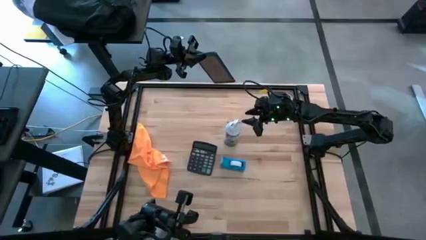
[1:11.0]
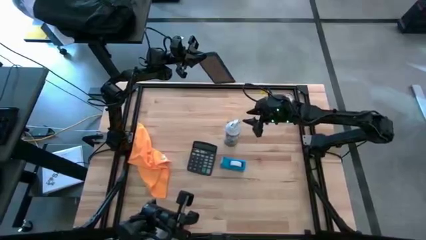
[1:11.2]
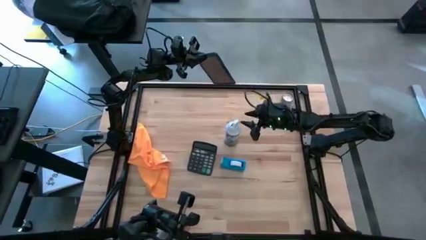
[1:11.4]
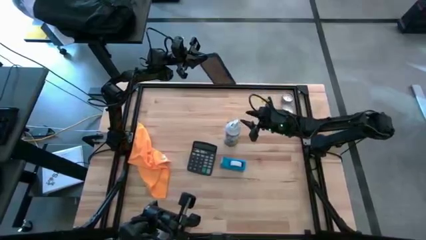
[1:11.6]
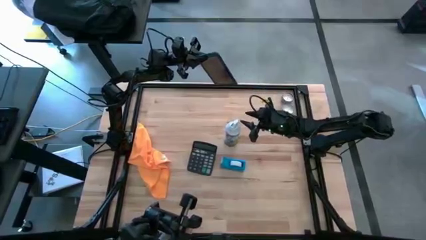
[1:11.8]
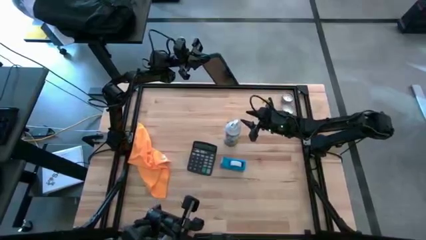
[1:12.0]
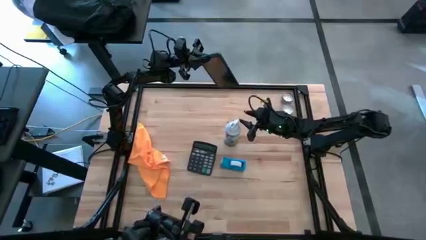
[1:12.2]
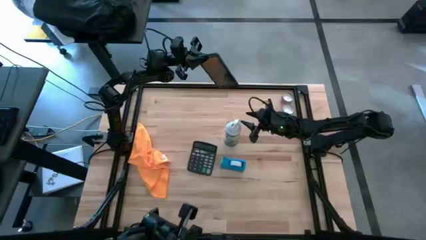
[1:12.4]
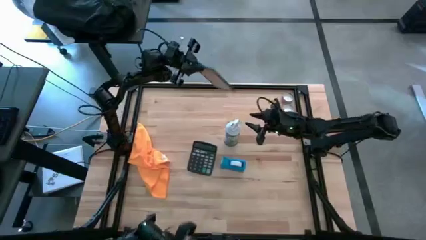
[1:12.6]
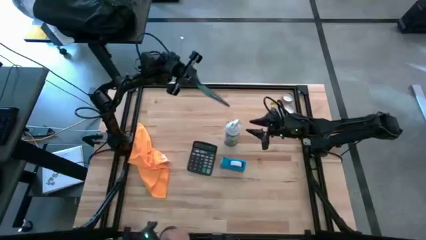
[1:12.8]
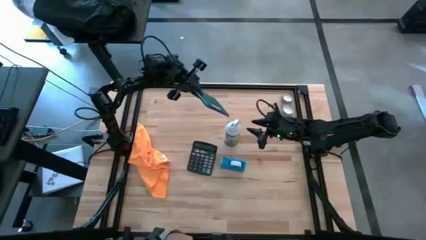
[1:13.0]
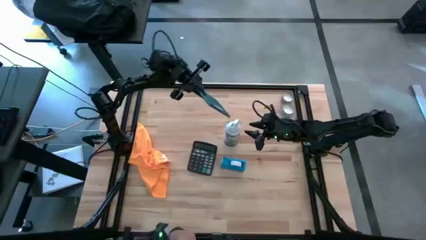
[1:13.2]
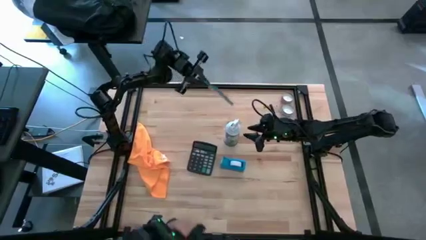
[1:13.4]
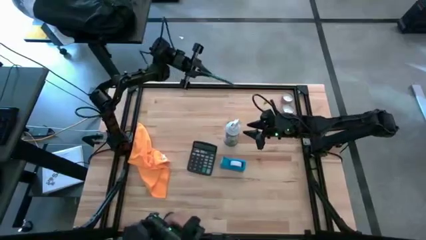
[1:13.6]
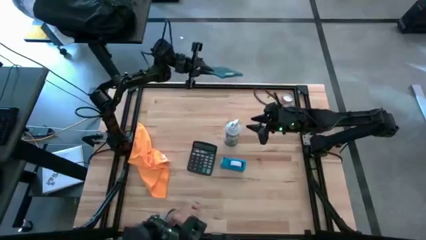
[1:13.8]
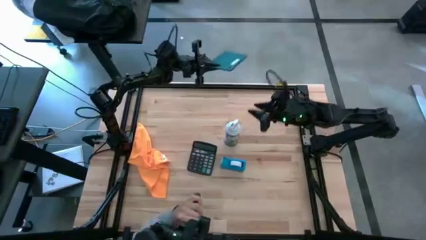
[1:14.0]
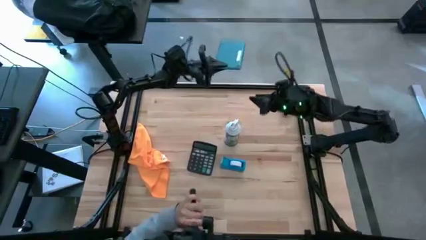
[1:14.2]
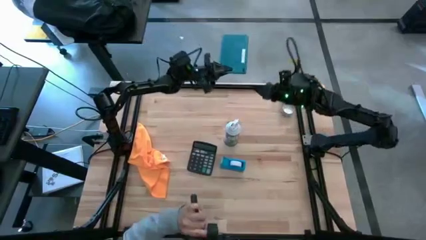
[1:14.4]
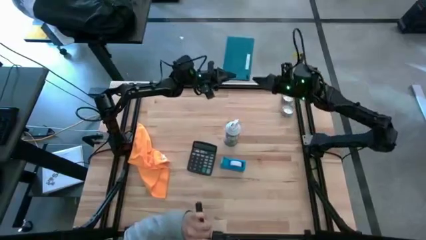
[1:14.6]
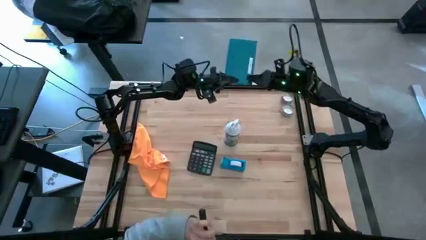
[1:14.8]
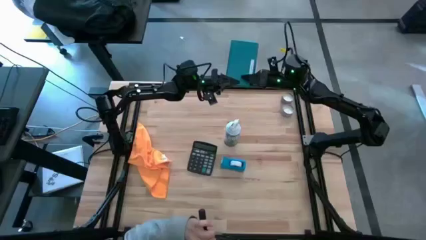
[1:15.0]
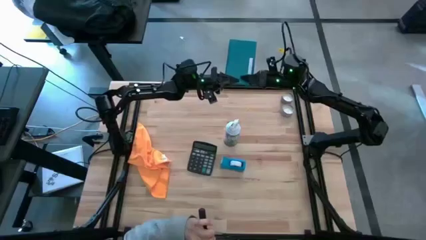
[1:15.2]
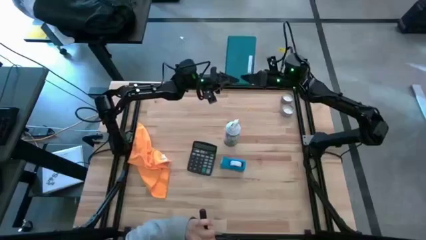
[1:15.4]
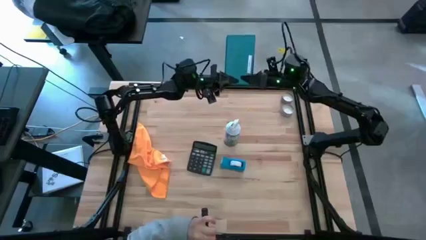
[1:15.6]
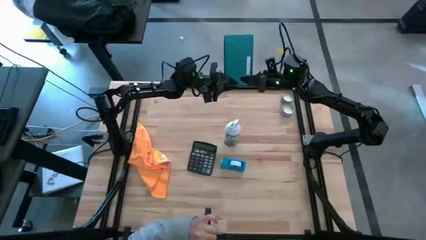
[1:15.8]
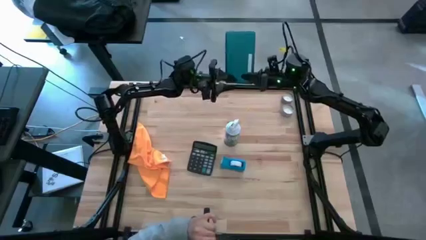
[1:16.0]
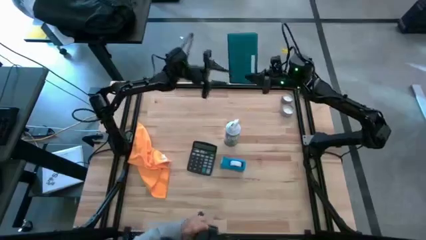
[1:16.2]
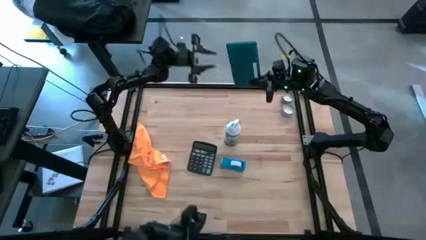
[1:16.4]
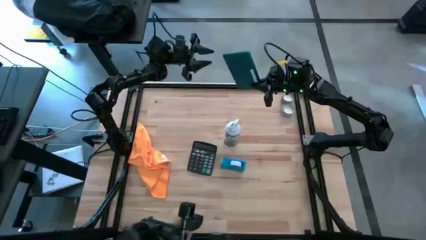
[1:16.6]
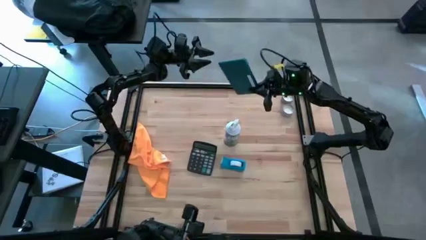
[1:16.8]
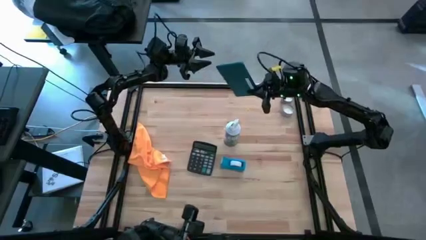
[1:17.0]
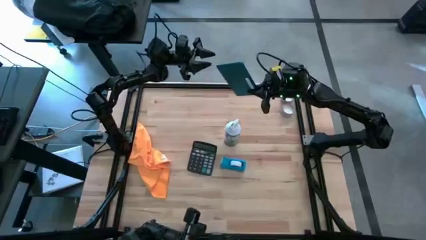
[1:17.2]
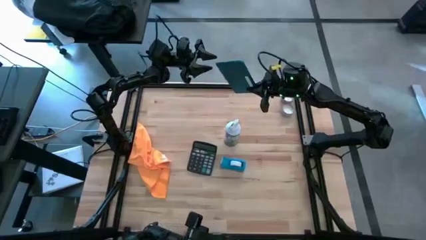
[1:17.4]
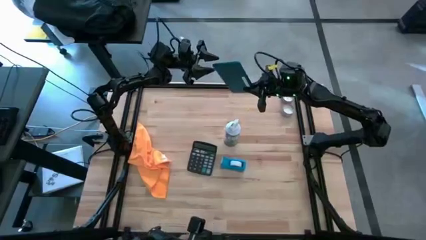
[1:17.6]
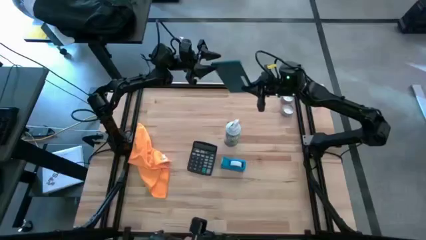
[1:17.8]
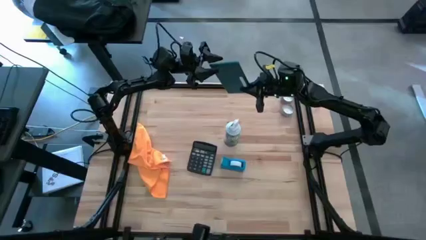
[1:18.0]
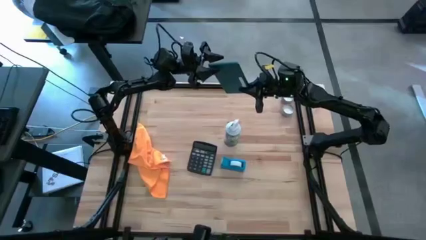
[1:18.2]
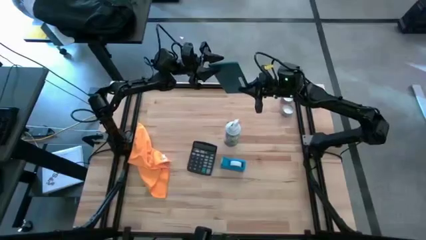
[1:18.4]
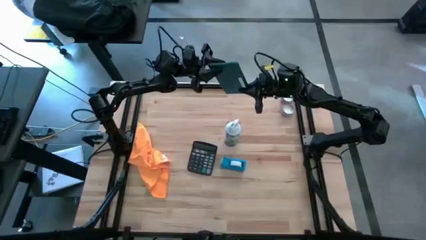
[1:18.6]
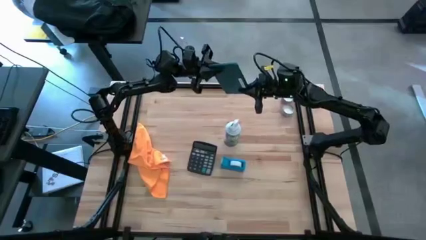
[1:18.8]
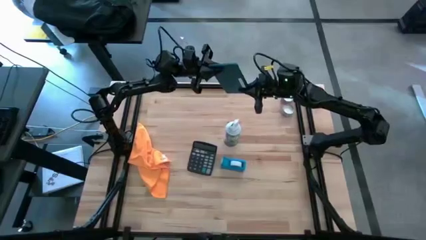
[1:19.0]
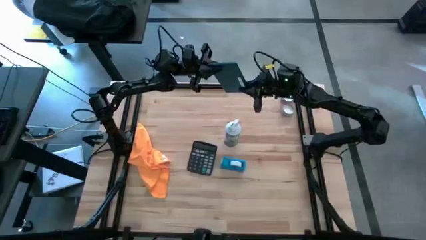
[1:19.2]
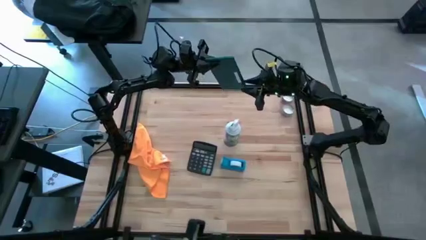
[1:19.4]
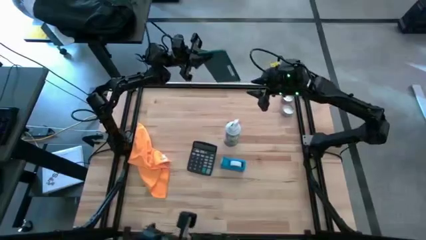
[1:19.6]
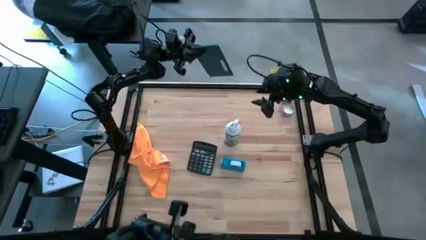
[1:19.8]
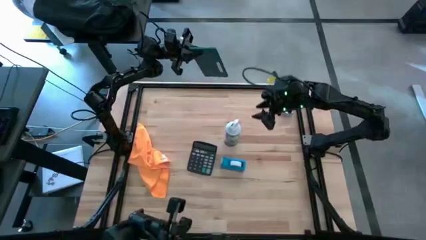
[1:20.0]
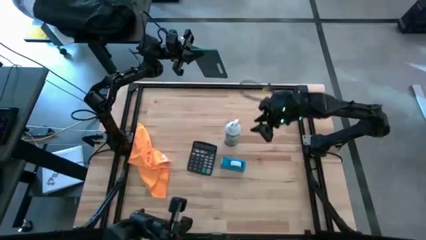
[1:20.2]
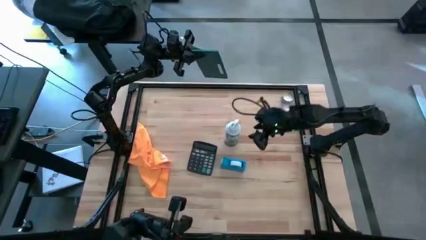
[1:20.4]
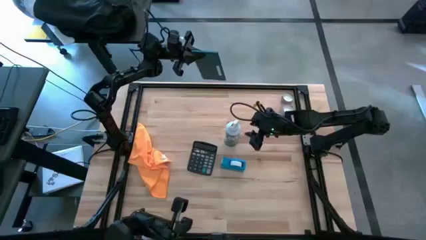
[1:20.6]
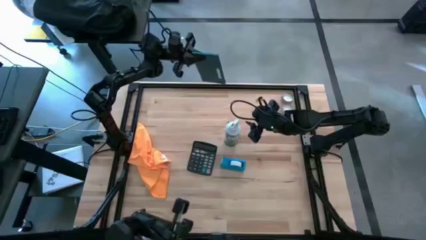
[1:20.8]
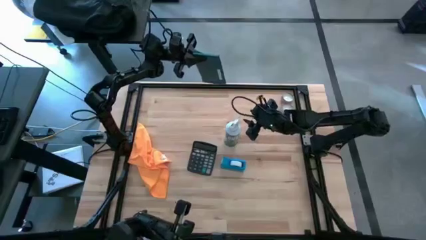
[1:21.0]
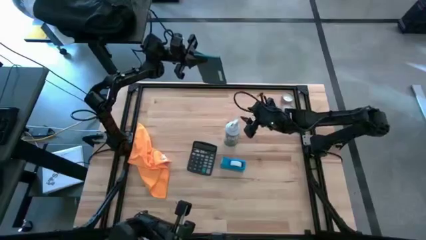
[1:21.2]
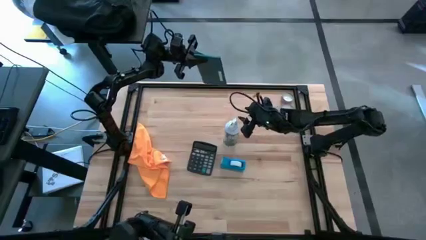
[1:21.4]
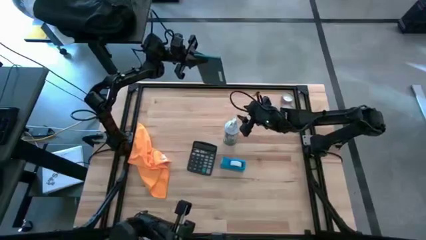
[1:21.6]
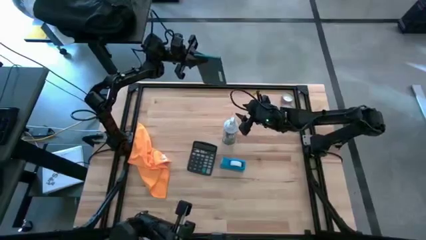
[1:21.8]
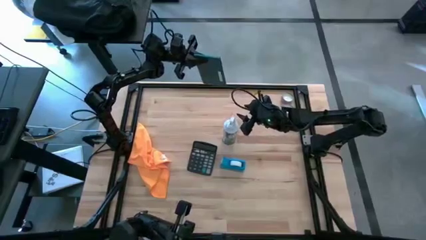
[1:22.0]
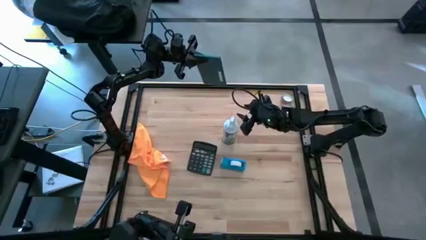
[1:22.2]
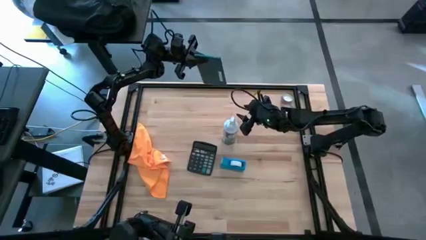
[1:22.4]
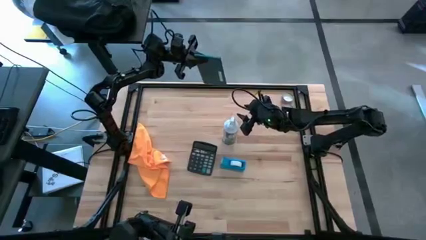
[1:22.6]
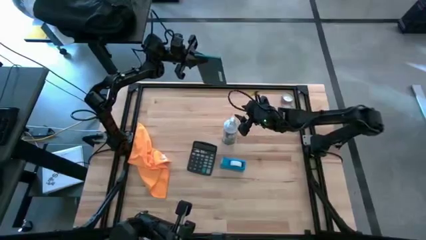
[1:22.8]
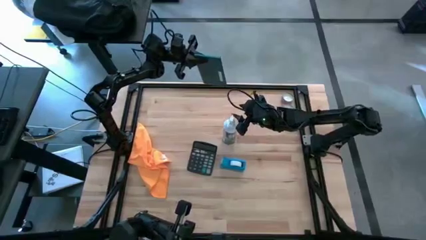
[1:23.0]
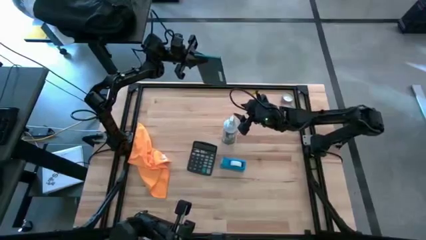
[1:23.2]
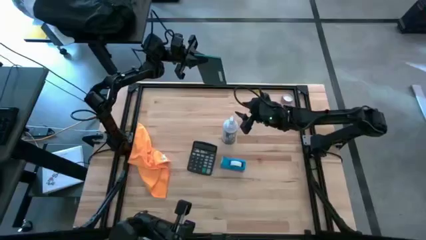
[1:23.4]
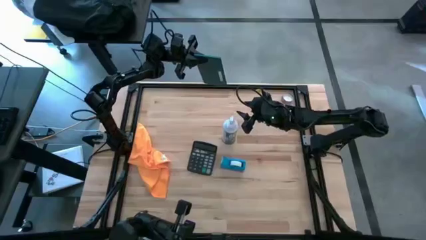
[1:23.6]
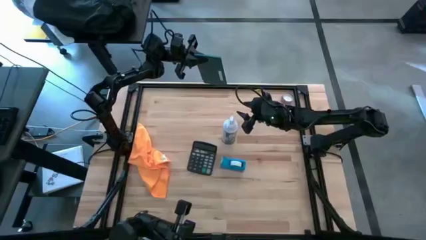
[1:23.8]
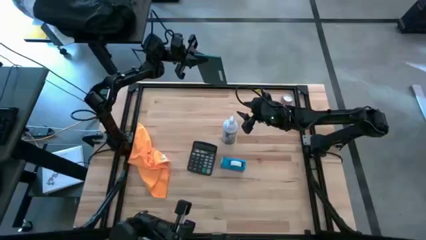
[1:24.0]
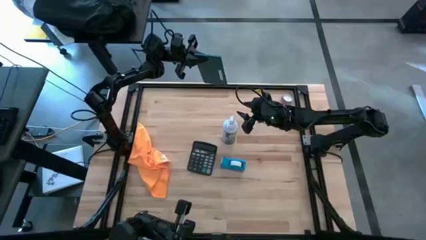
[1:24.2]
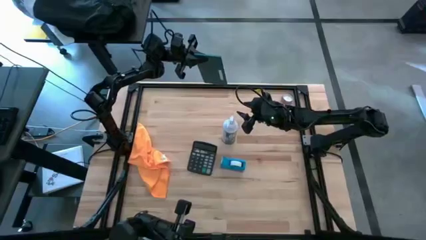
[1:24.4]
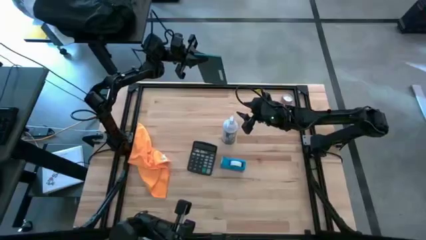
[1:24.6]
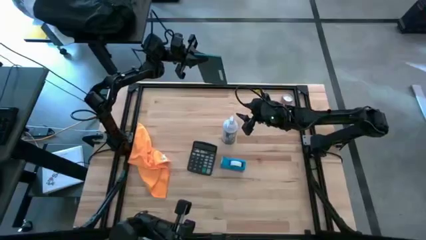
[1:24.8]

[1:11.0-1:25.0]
Task: Apply microfiber cloth
Spray the back of the cellphone with spray bottle
